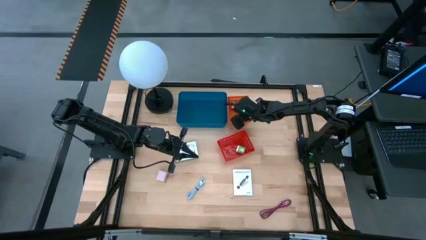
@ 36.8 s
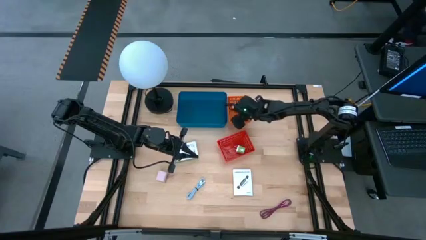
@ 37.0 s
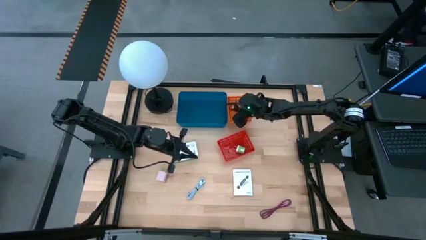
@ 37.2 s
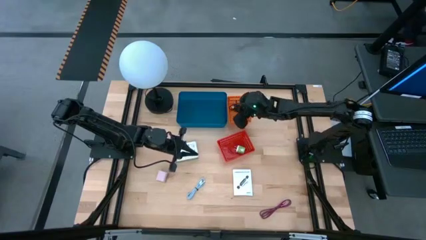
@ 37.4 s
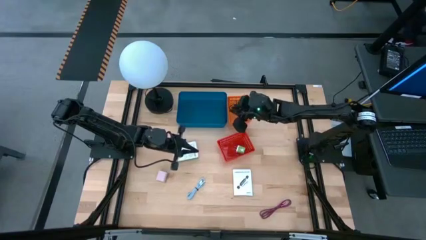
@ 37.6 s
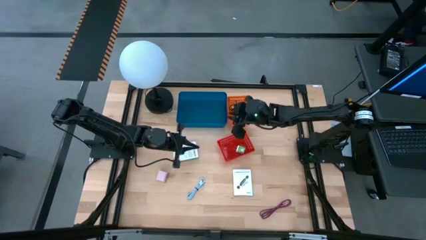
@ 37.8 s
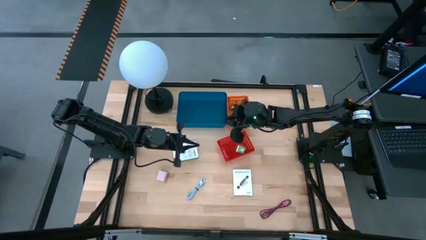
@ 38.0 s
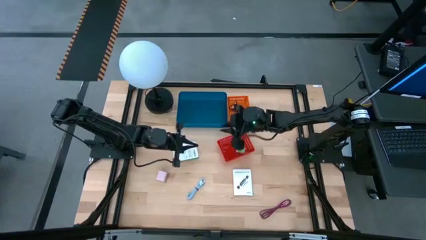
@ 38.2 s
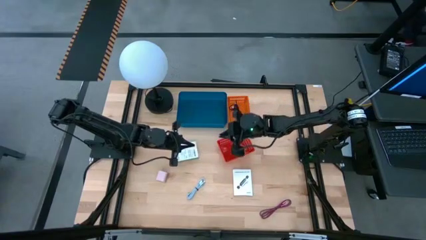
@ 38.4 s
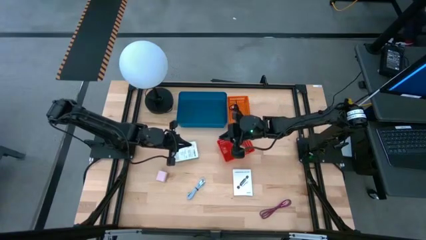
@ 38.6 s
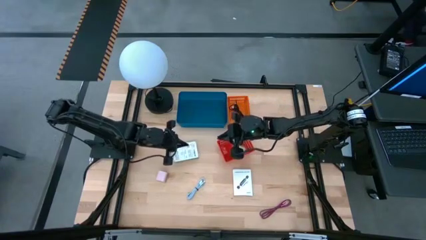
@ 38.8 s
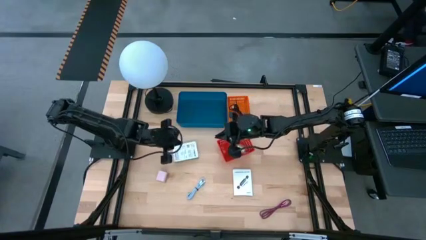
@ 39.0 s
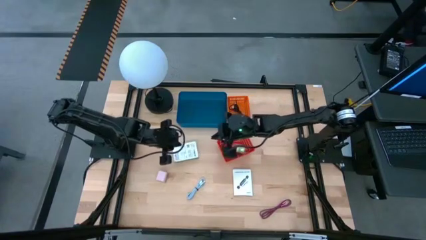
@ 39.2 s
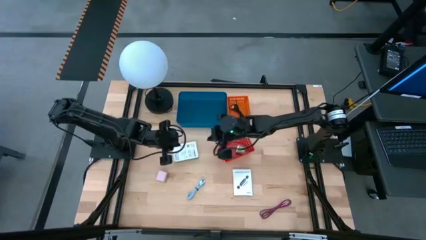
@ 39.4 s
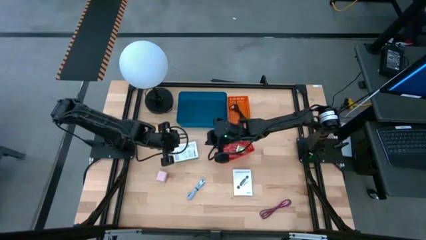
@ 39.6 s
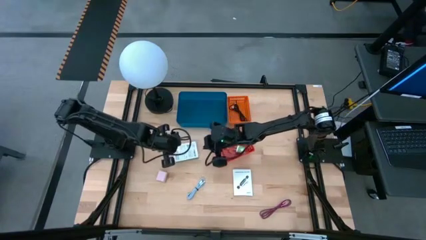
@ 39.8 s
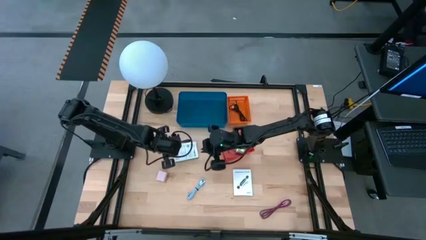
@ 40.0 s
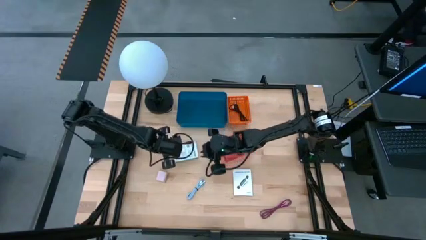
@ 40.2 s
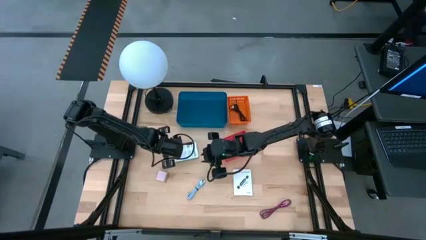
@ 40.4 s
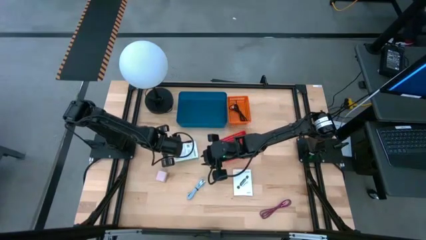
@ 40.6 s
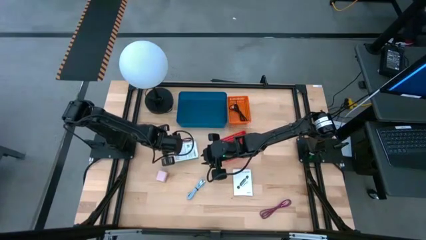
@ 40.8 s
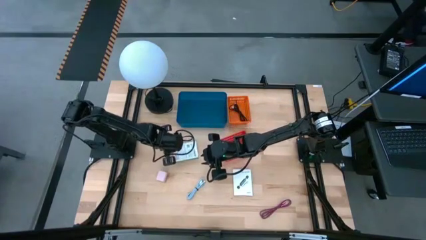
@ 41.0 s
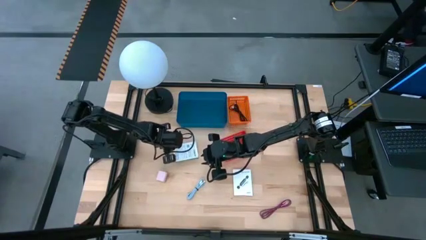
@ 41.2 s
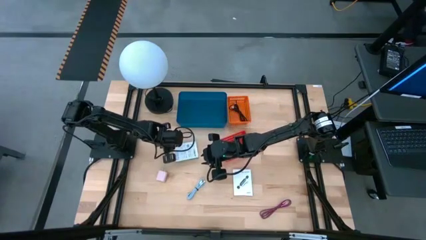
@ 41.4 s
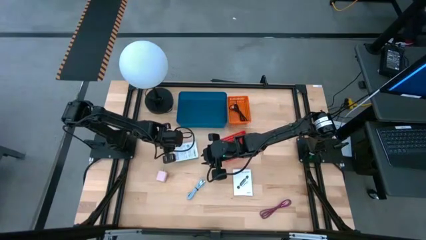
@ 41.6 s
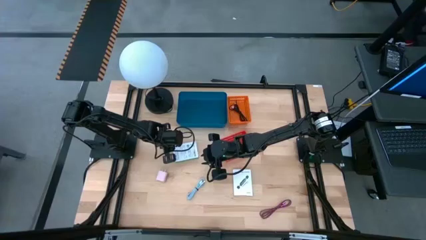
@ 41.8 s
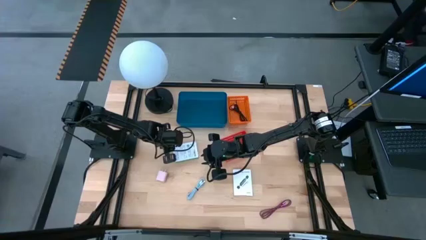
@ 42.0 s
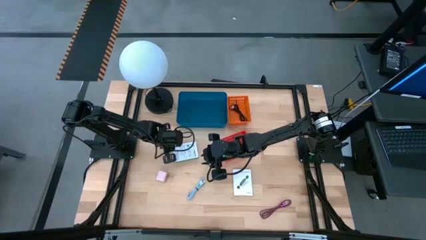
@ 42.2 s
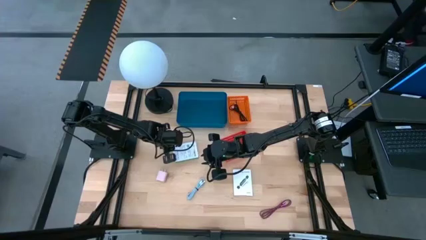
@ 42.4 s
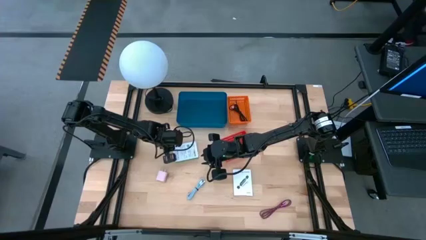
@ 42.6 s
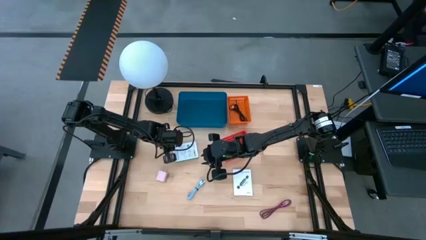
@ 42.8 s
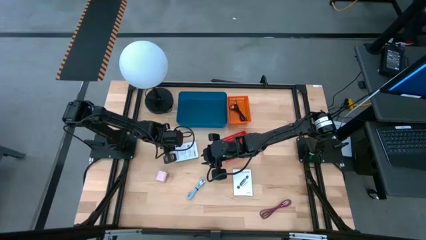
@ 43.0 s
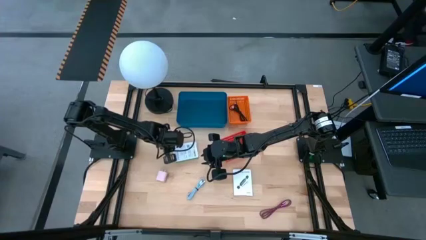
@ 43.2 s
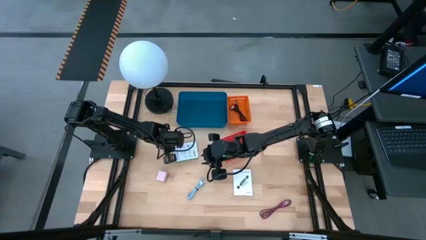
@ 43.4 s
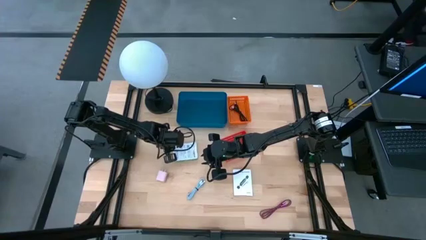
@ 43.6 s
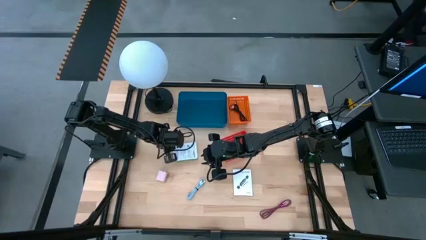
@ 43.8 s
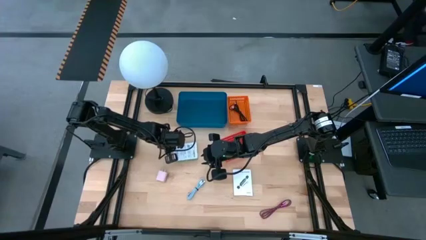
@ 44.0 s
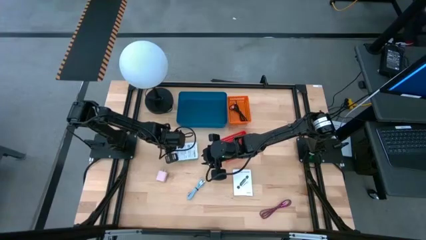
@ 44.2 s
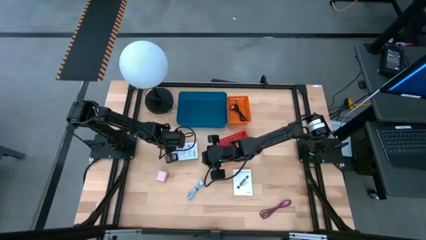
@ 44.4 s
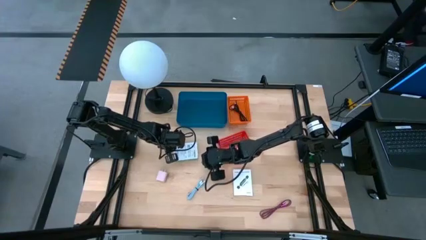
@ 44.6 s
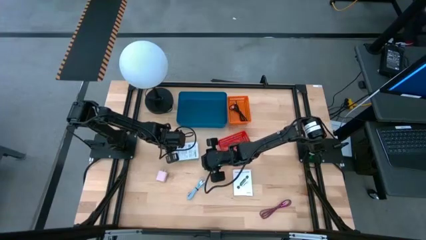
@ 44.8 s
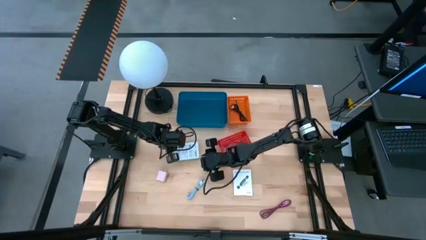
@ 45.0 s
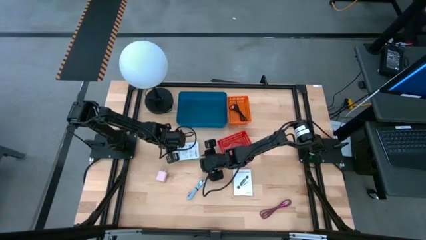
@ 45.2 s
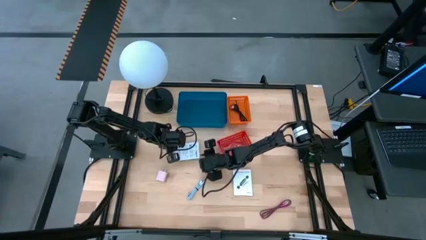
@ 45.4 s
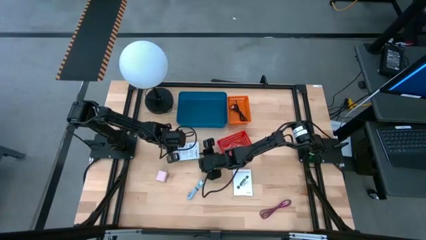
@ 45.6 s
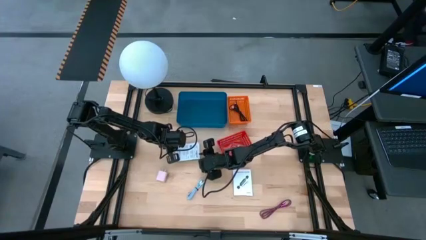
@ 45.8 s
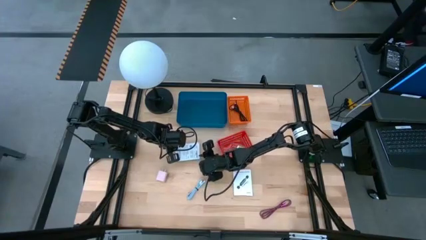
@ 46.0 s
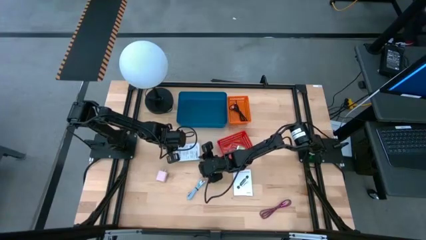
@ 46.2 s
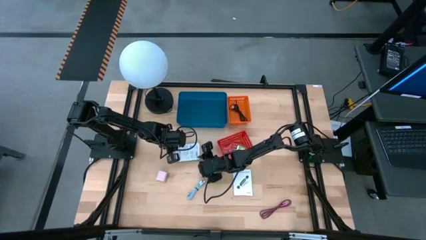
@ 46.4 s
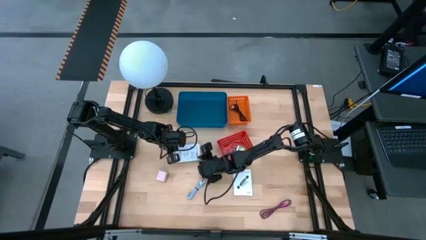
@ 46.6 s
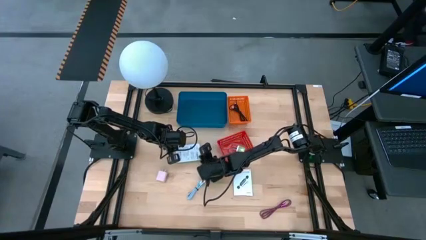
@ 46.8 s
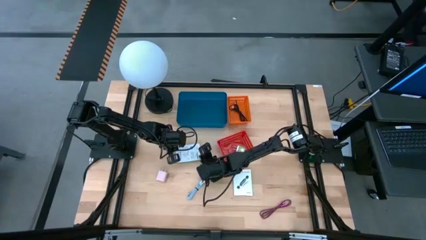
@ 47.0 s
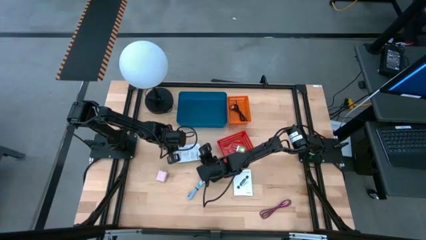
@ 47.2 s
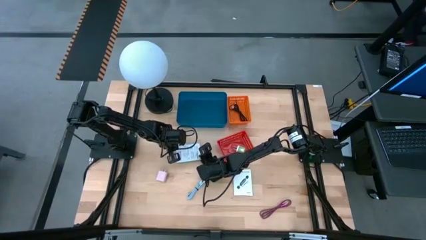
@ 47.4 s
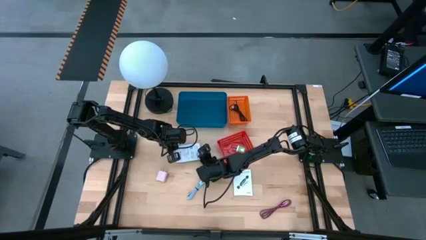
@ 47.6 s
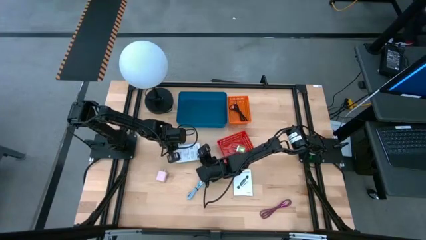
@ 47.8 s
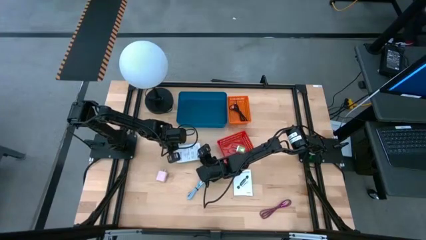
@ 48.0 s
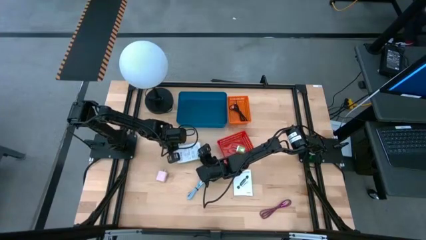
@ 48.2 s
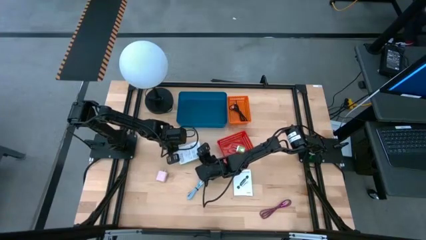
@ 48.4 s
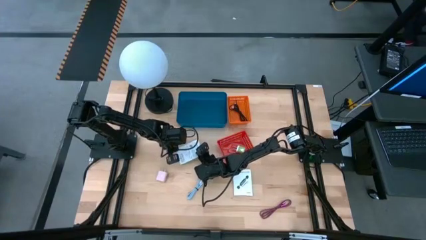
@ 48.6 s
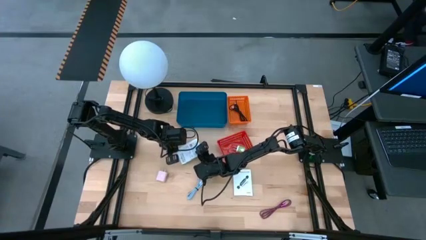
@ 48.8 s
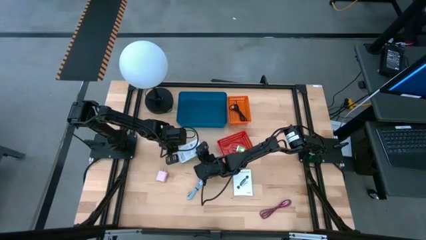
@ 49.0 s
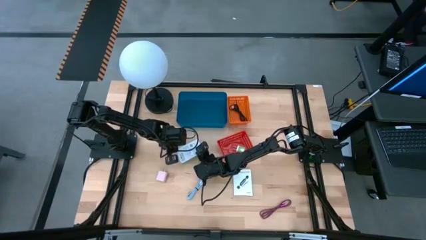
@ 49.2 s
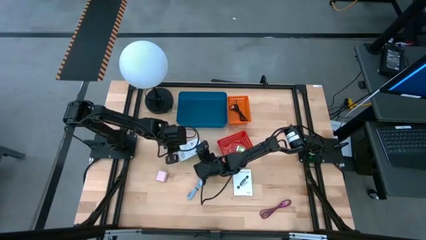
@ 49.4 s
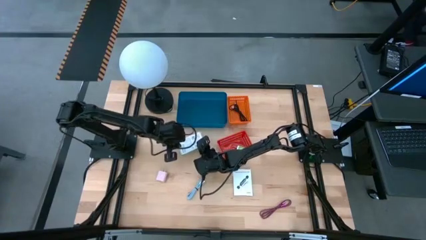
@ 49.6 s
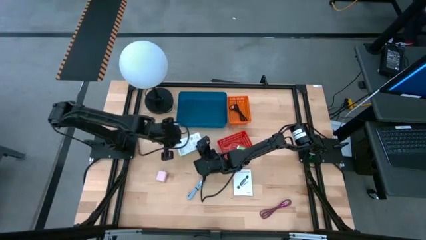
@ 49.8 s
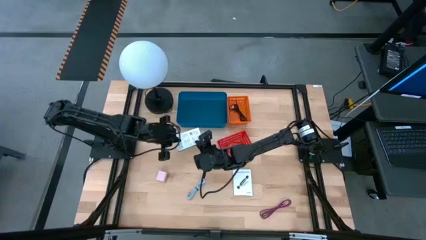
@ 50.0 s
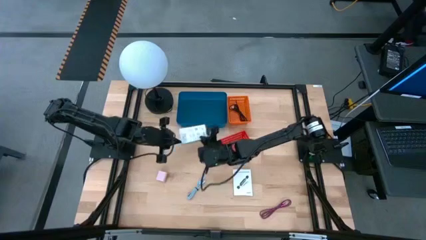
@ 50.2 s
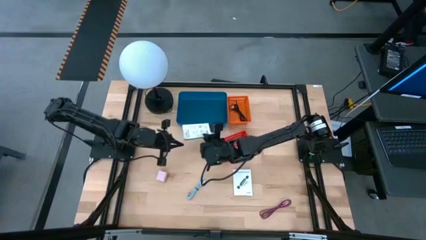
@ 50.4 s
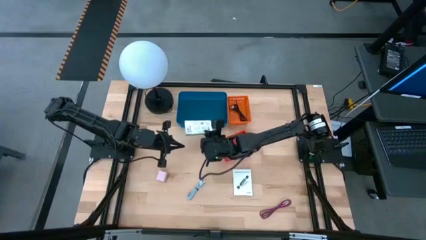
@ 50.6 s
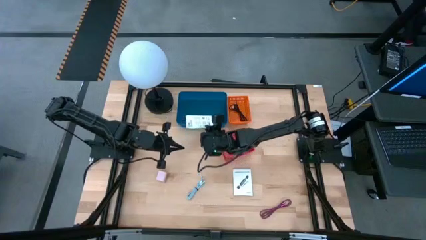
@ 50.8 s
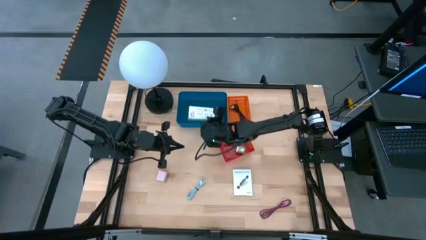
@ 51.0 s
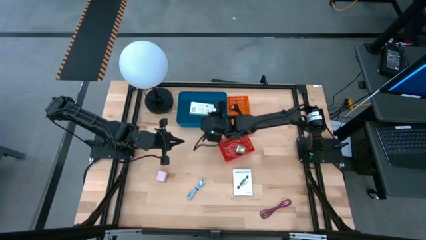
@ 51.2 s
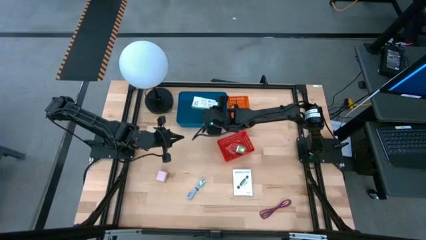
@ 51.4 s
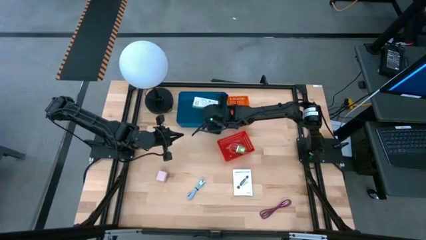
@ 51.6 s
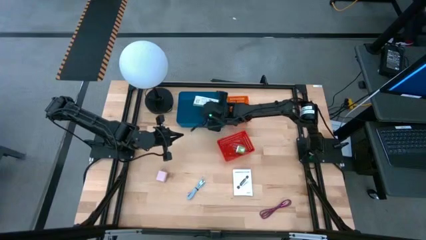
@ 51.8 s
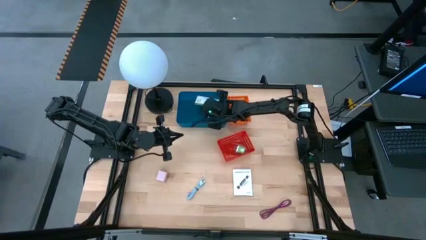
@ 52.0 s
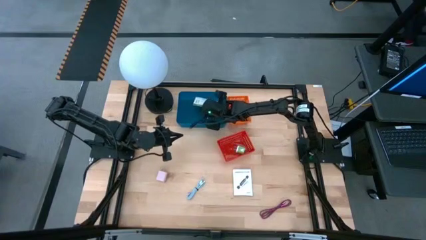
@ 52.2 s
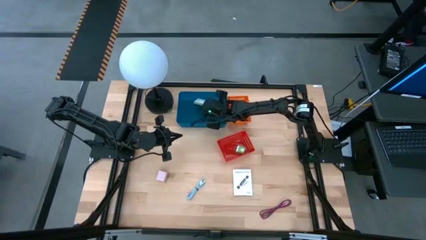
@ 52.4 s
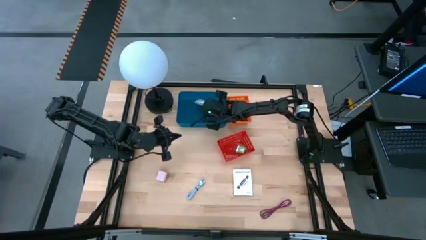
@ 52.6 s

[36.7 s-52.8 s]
Task: Pick and place items into bin
Put the left card reader box into the blue bin
